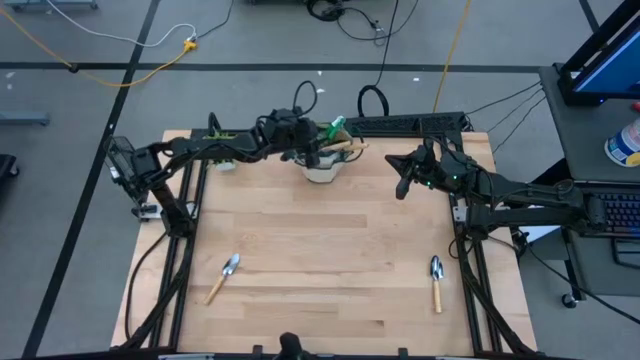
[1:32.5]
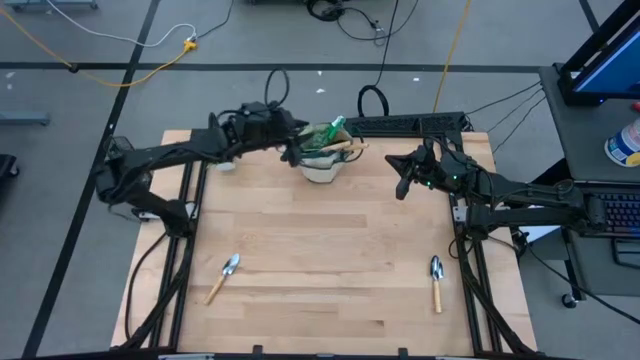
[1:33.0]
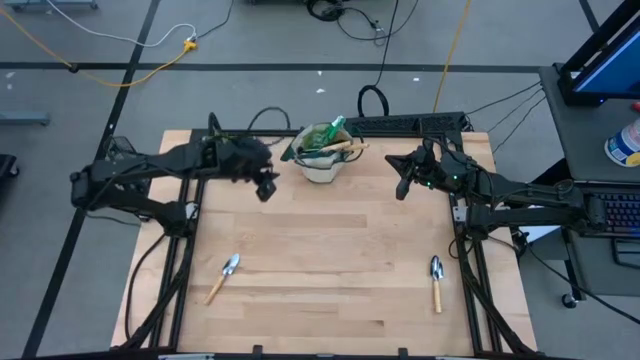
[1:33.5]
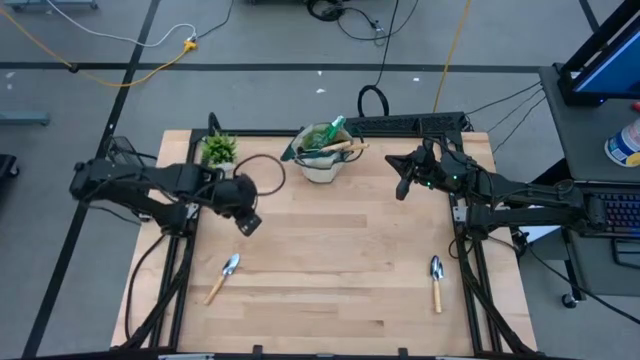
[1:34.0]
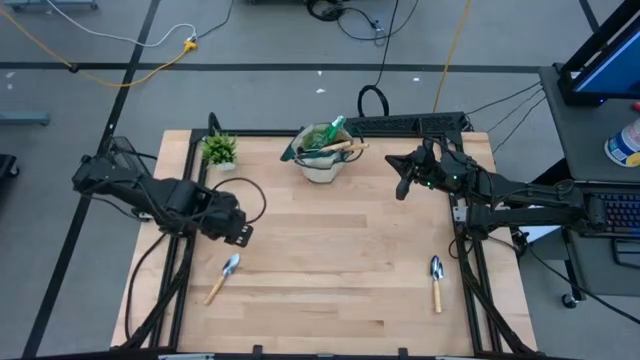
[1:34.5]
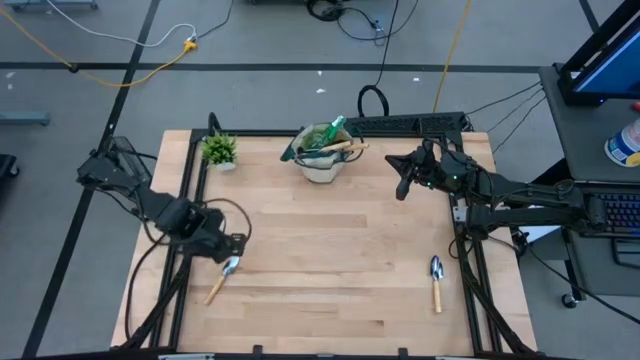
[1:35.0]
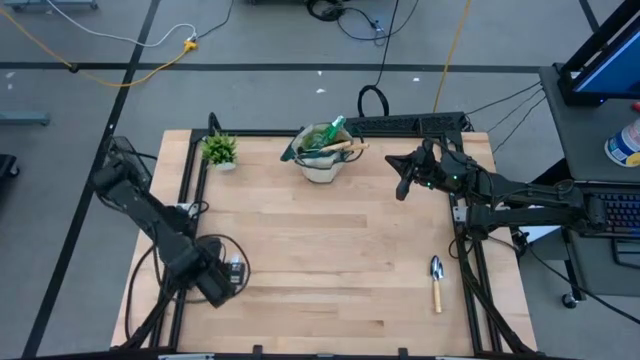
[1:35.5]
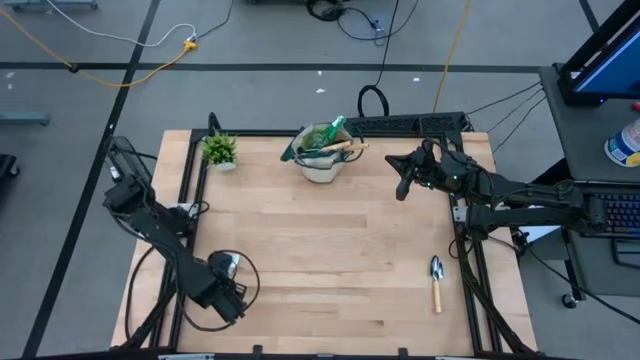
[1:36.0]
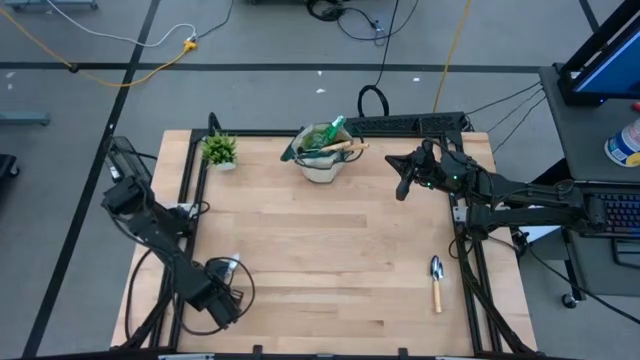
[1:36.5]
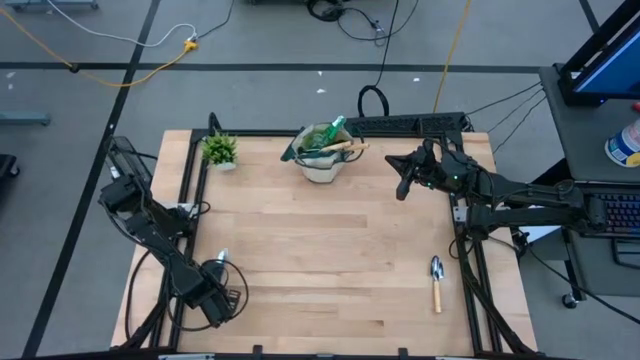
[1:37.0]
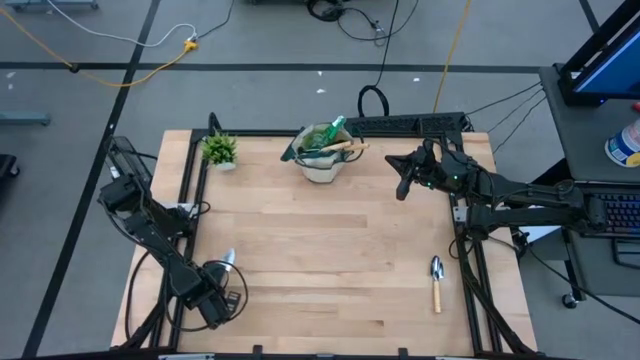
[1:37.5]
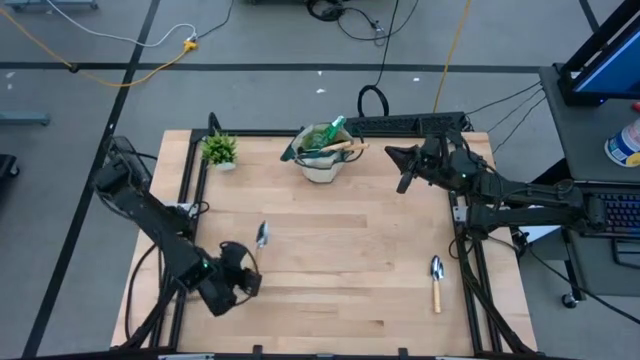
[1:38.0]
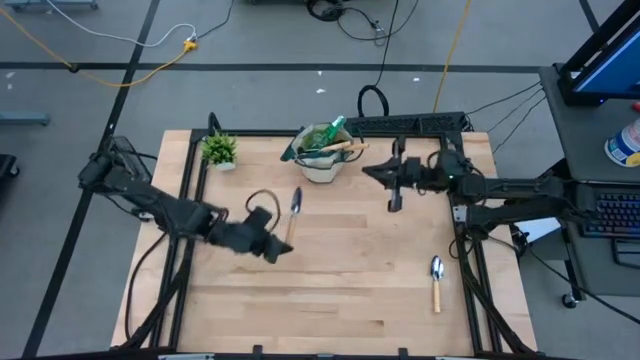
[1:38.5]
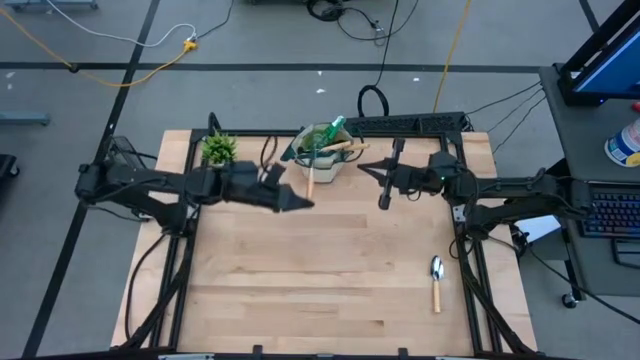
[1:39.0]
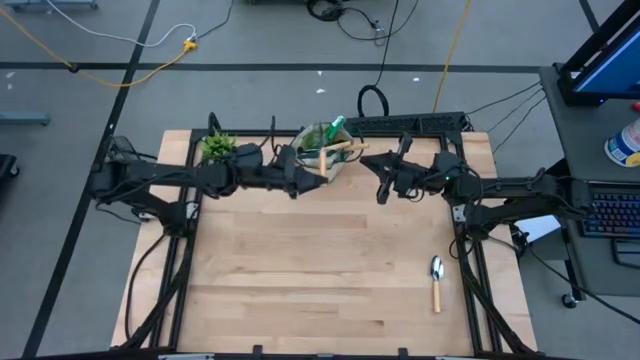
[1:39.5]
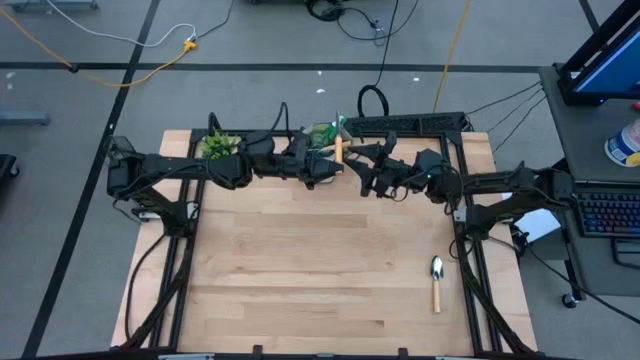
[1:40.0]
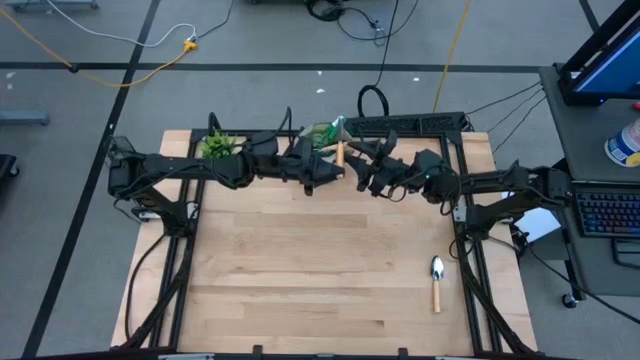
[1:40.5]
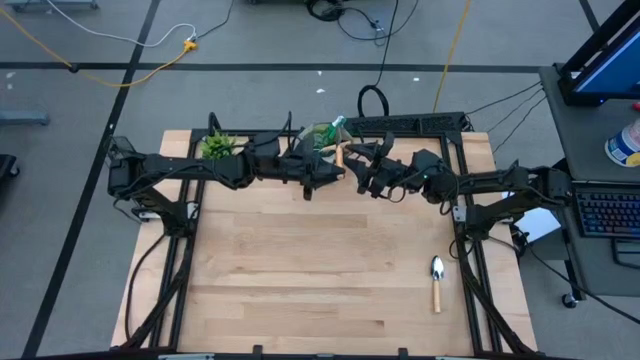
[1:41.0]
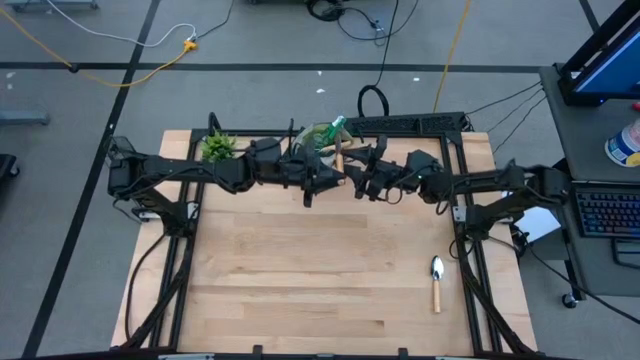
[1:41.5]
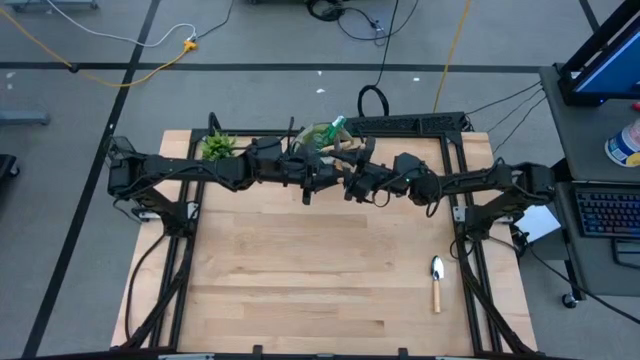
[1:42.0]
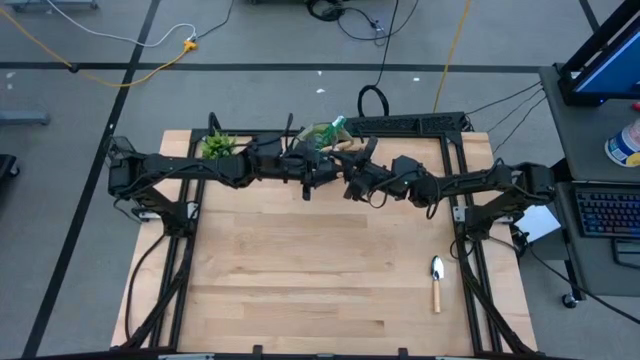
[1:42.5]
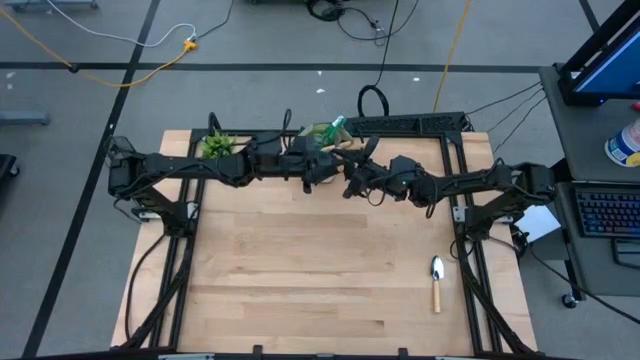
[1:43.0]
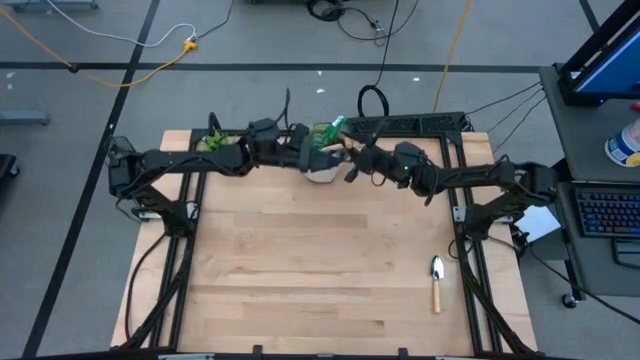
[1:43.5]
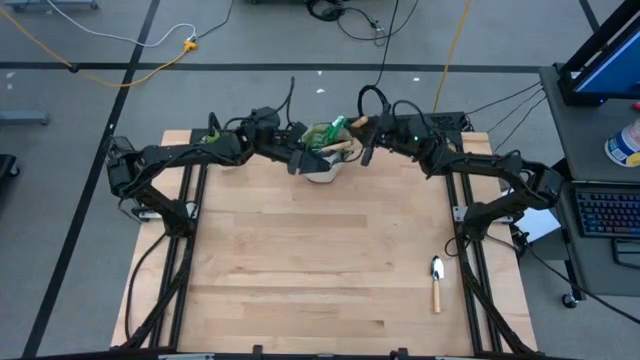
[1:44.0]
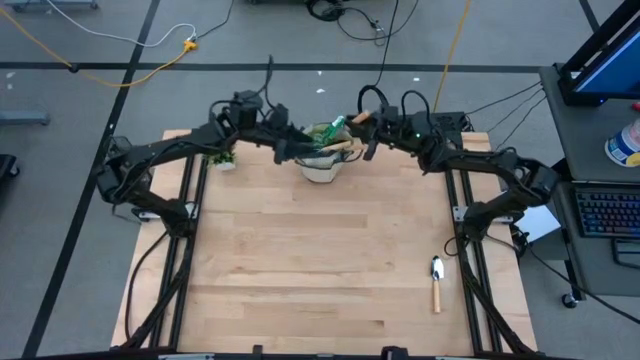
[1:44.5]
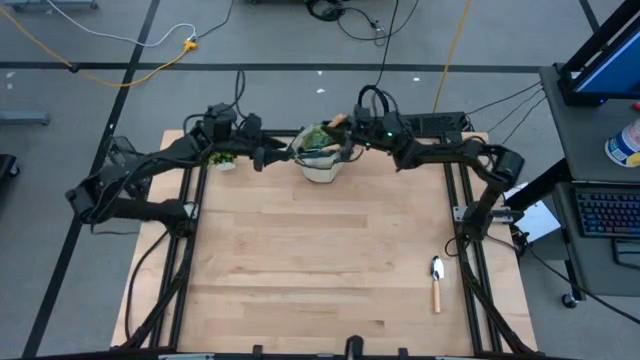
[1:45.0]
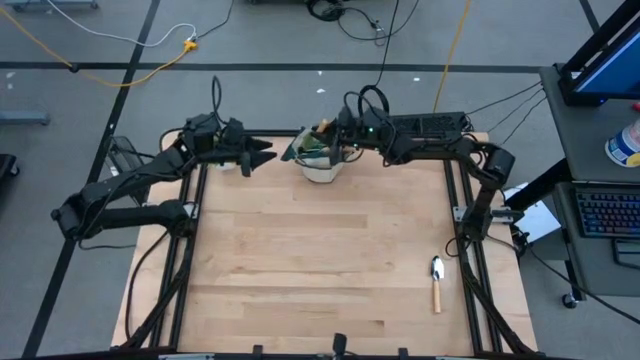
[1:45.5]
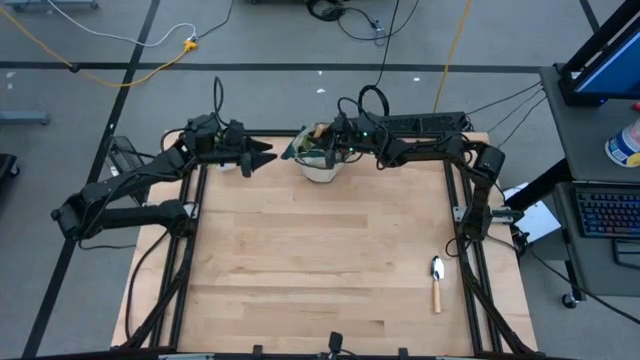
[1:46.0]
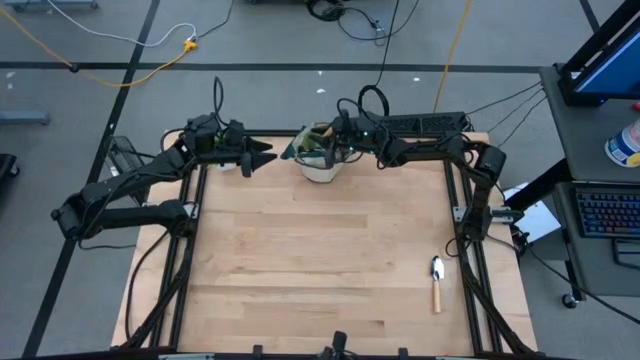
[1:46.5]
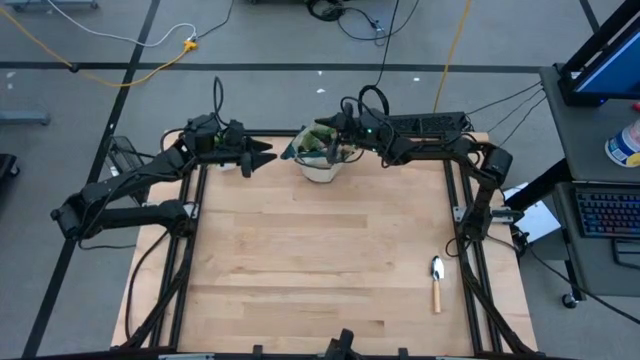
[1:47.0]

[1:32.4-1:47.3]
Task: Pick & Place Garden tools in Gardening bag
Put the brown trowel into the green gardening bag

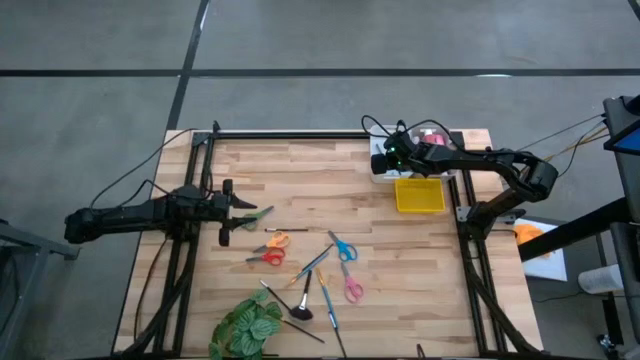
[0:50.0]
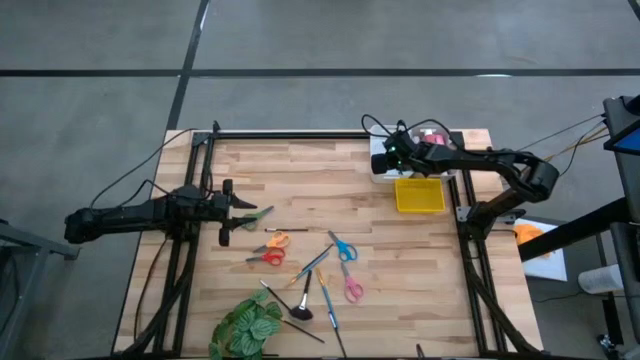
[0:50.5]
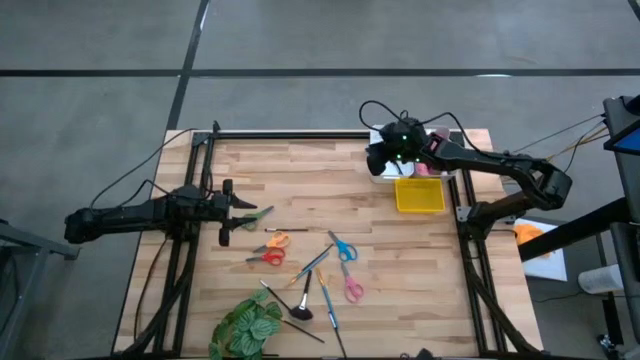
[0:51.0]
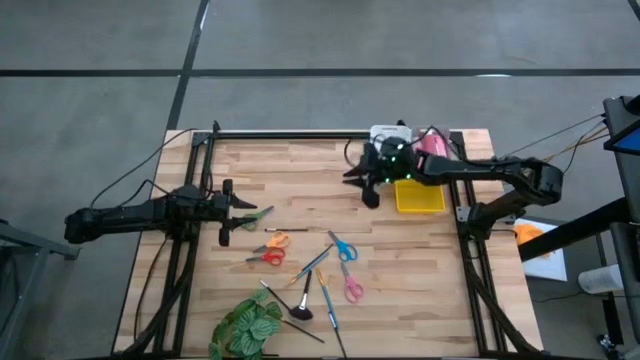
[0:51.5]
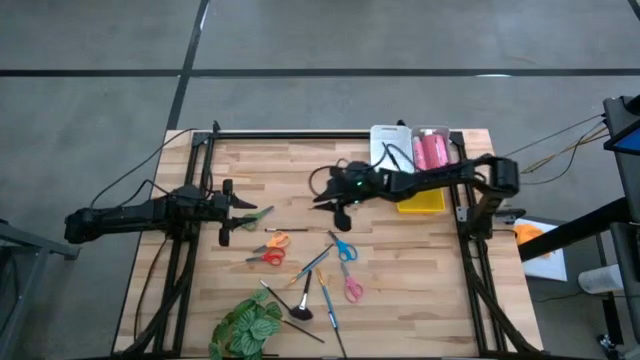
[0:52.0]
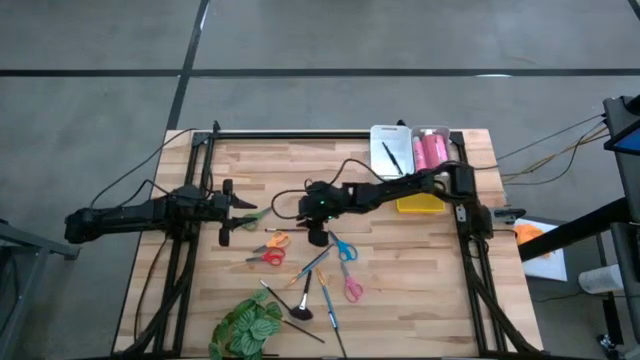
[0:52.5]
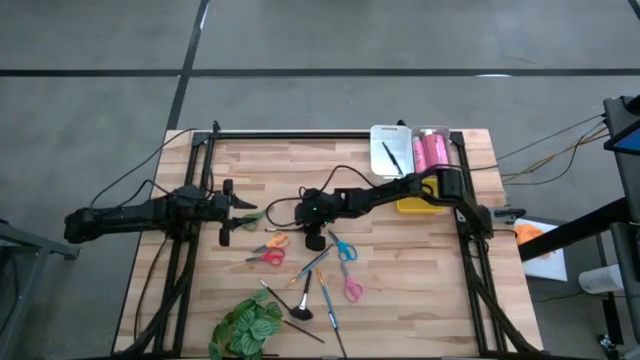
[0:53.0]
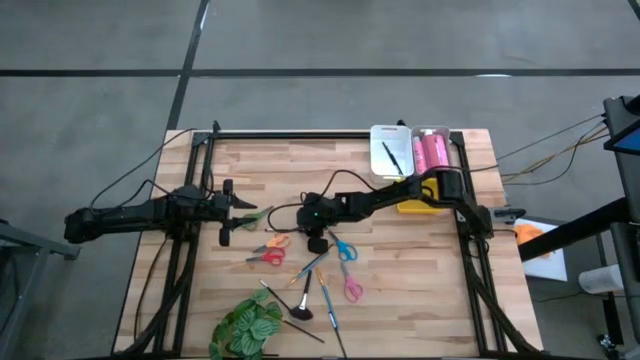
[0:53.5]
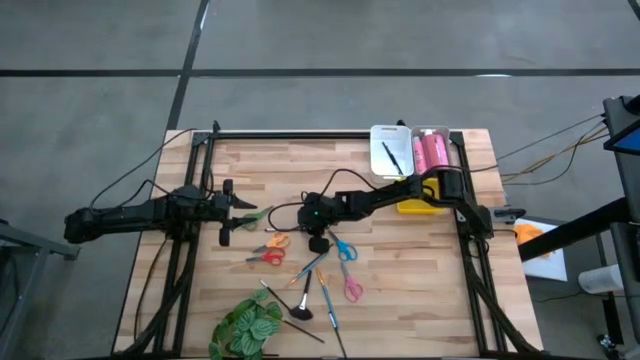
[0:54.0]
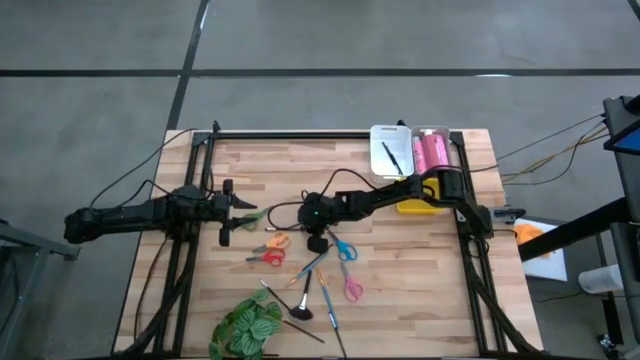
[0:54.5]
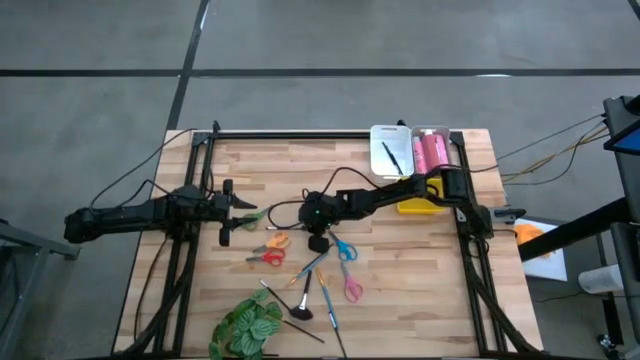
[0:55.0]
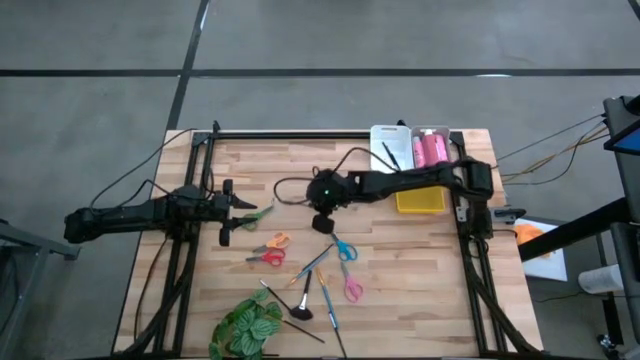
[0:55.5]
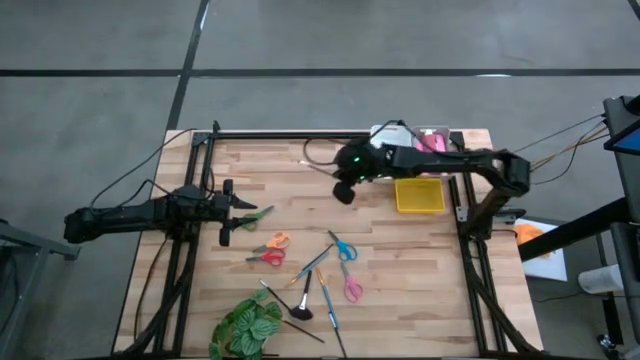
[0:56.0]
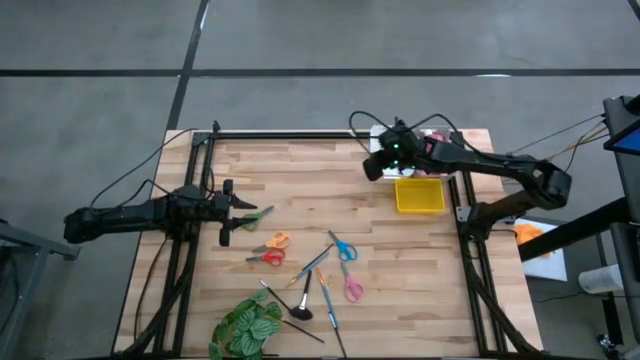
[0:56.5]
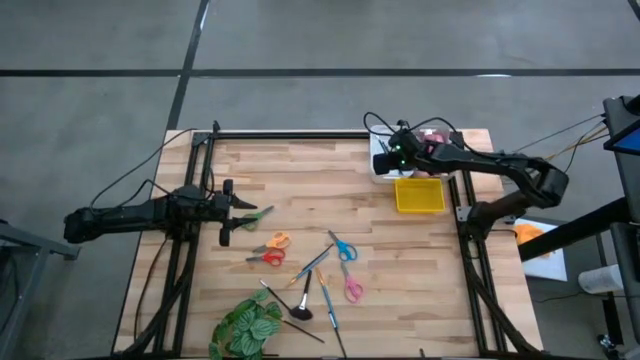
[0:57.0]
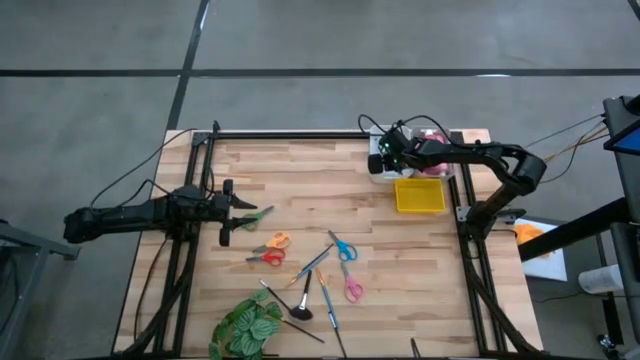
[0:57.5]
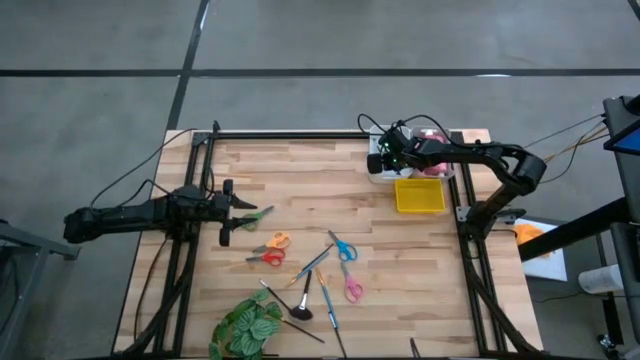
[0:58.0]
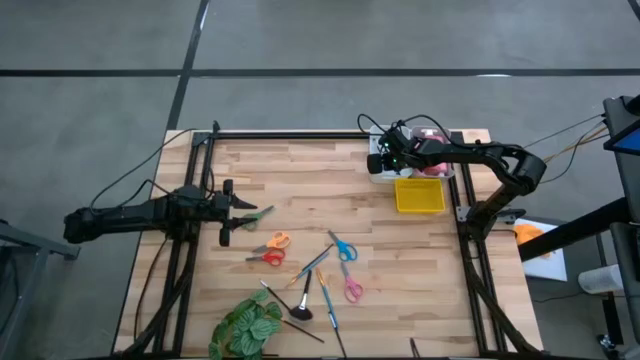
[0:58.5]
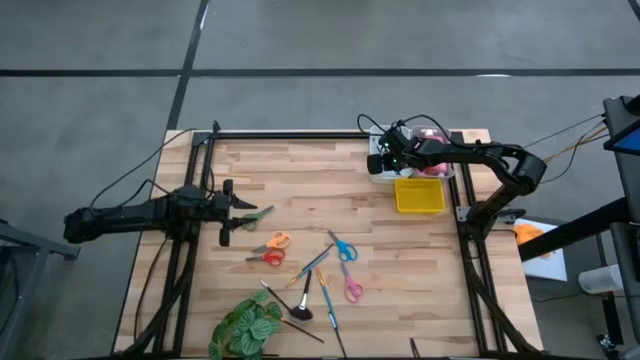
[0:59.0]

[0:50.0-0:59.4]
Task: Pick & Place Paint Supplies
Put the black paint brush into the white bin
